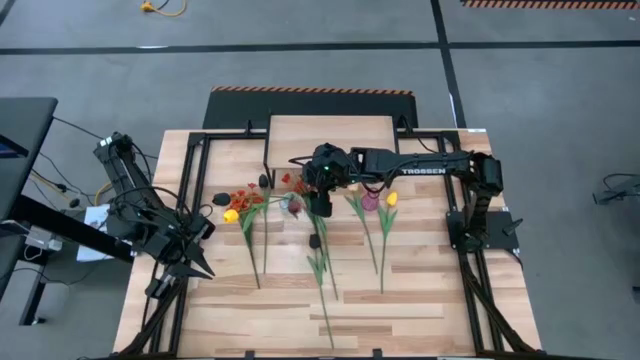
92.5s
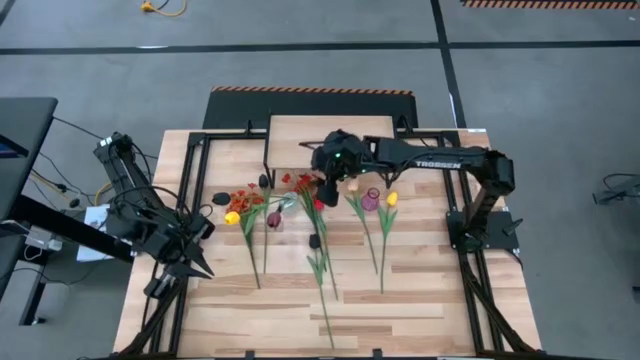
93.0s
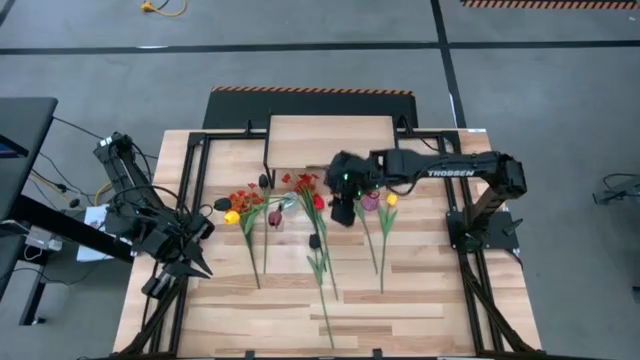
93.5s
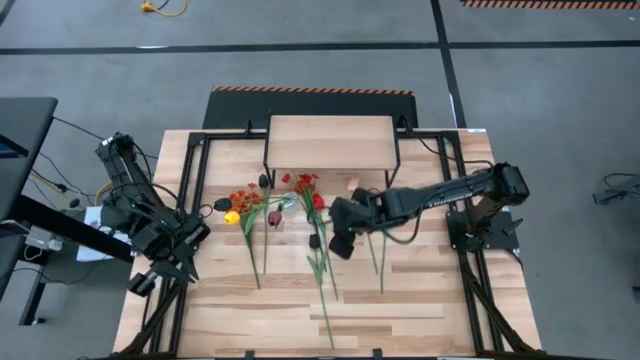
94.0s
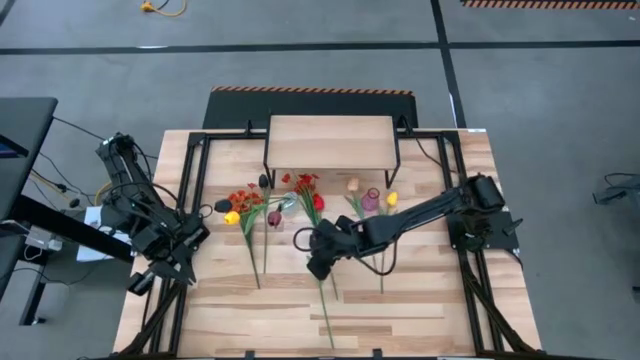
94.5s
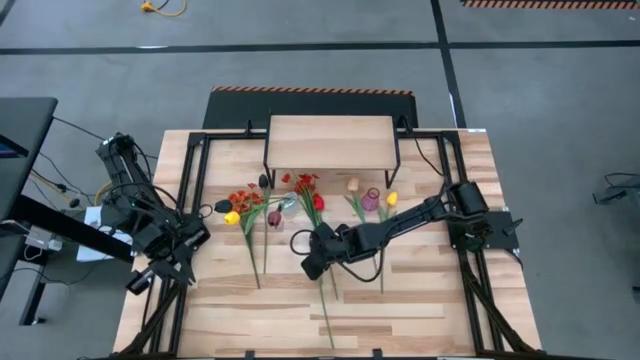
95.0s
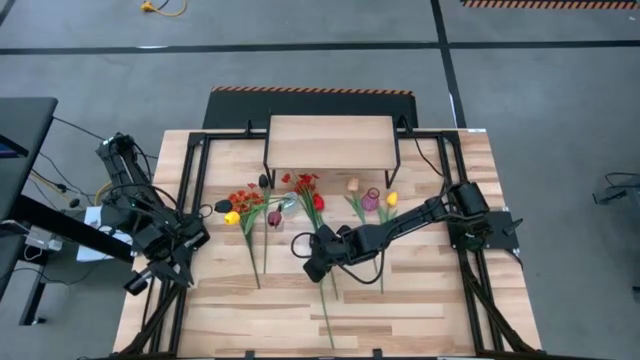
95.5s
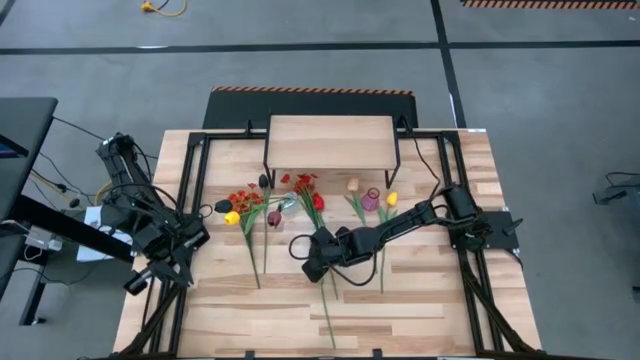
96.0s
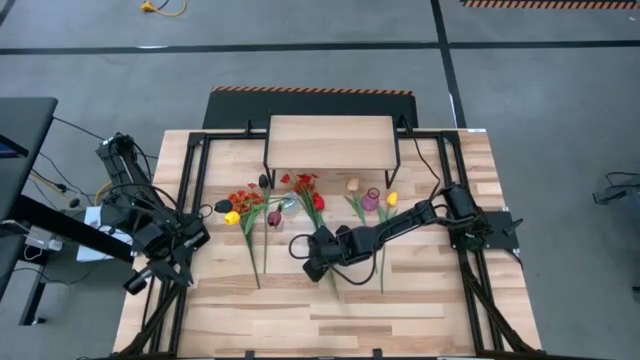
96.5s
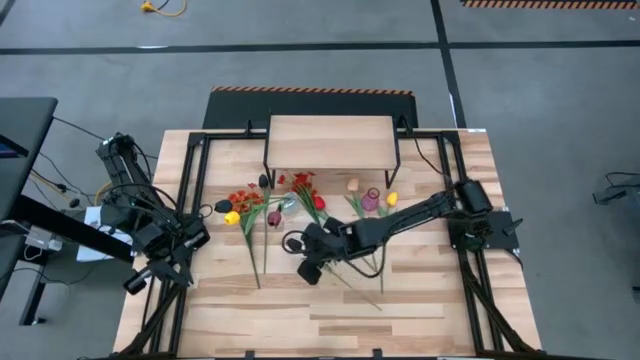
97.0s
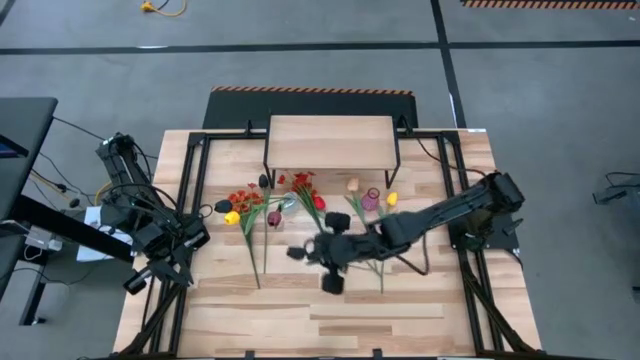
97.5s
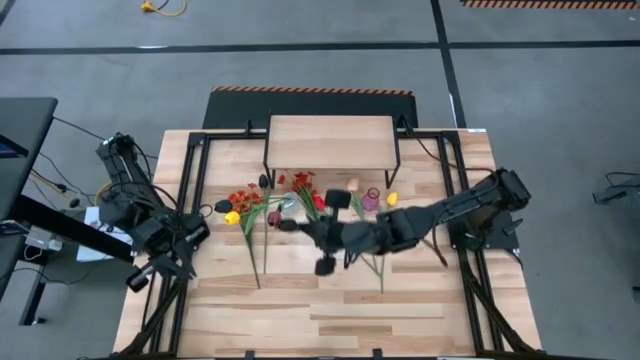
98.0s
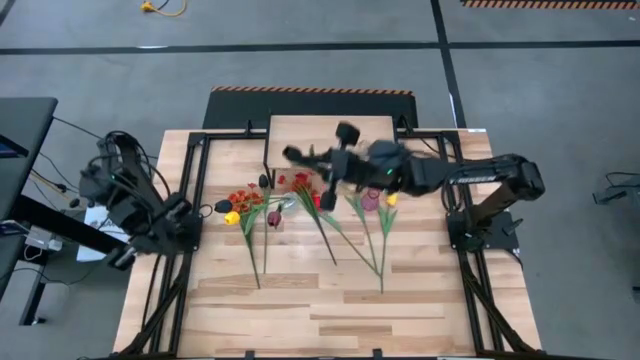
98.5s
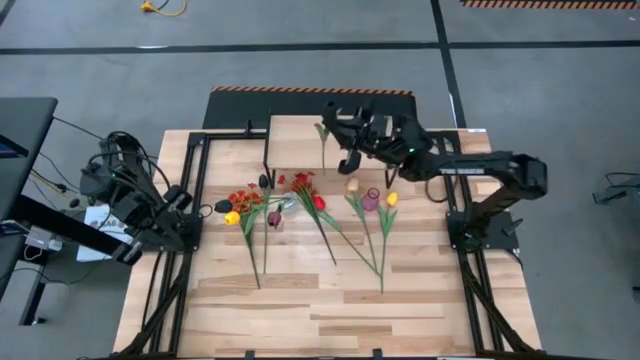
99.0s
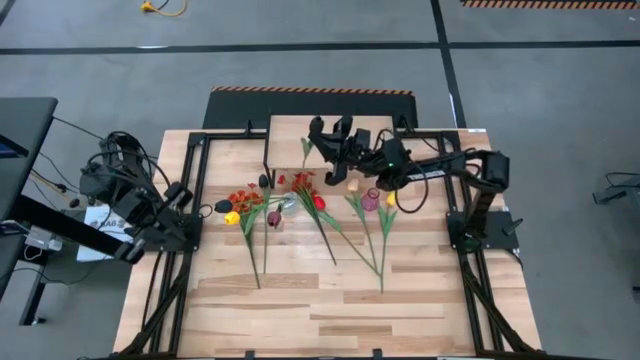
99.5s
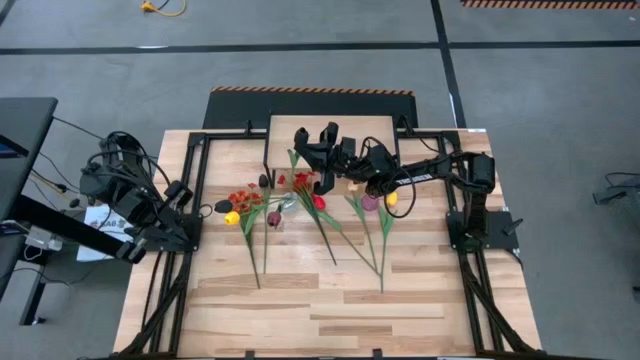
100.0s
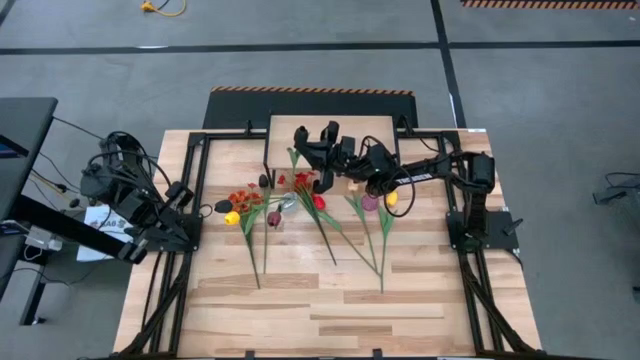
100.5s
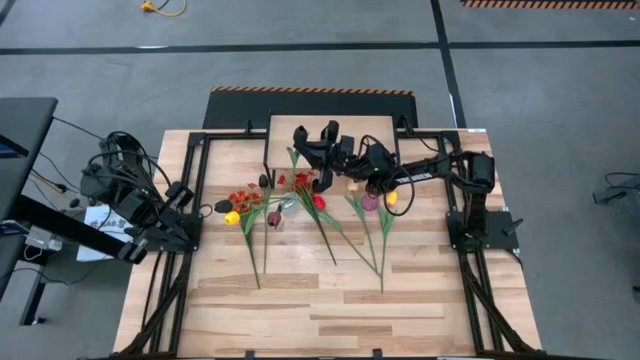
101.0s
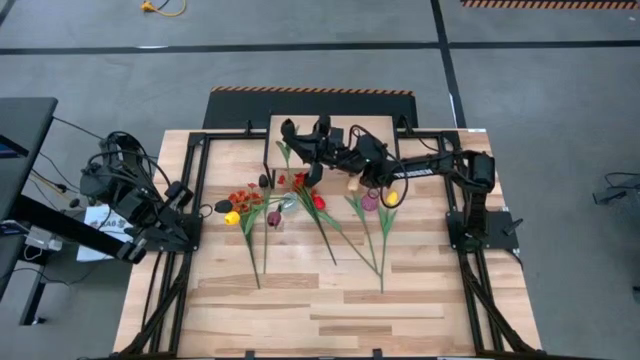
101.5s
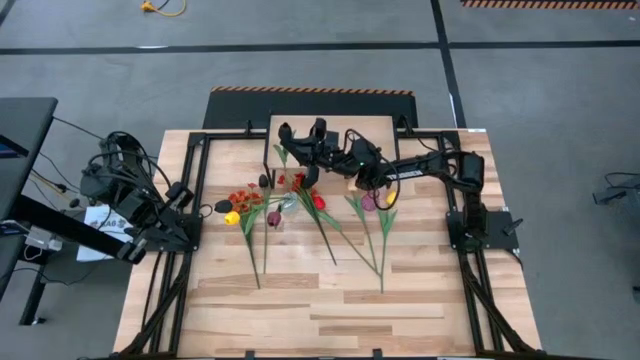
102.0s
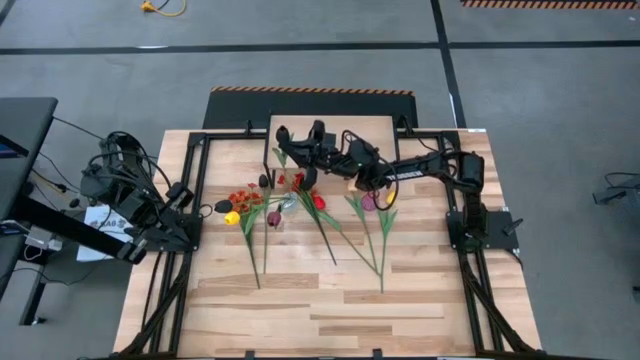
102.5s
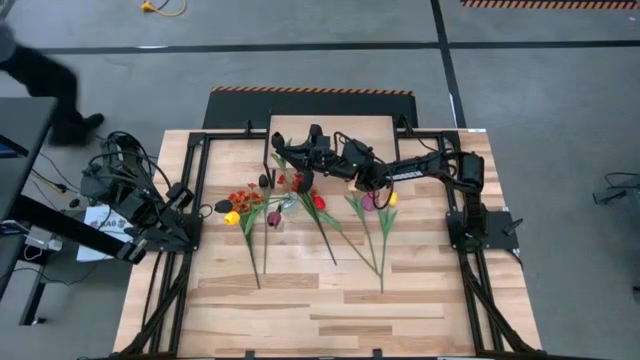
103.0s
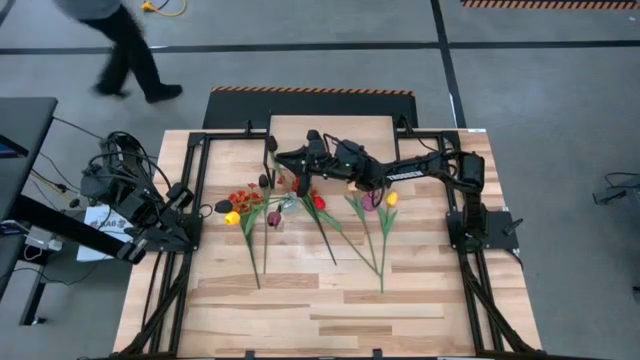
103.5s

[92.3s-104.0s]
Task: Pick and place flowers into a vace then onto a shelf
Put the right black flower into the transparent vase

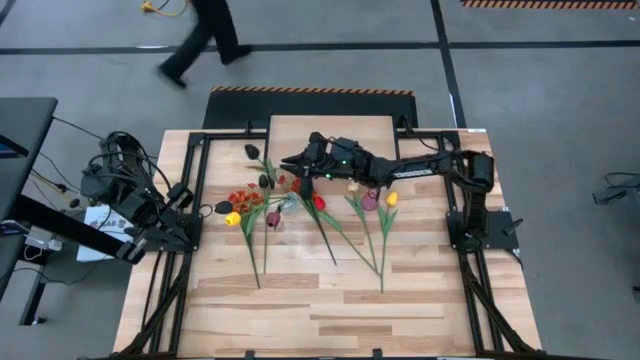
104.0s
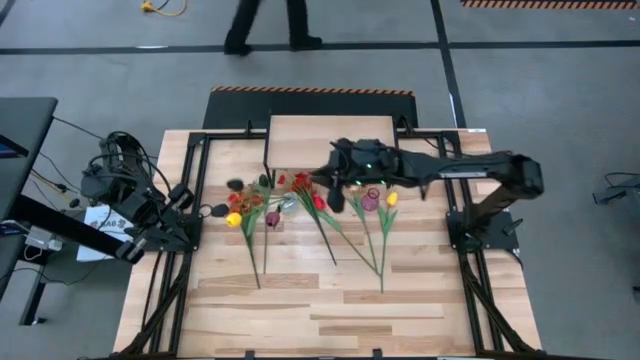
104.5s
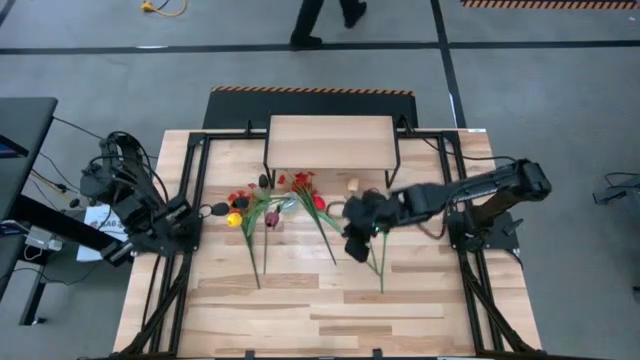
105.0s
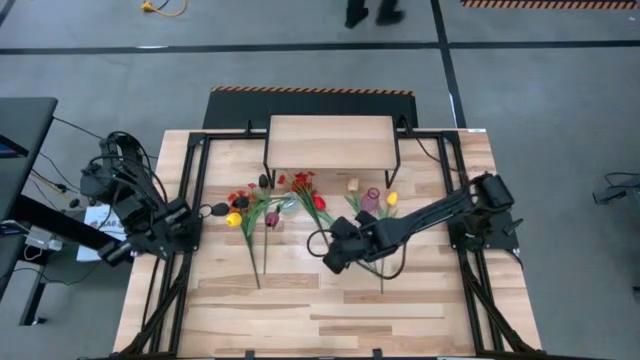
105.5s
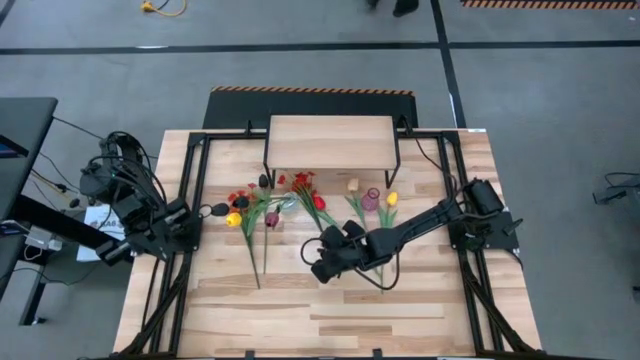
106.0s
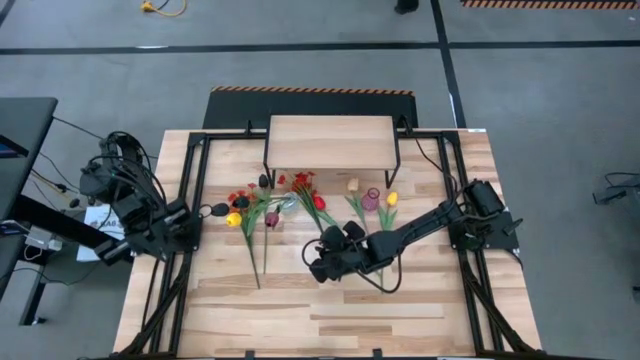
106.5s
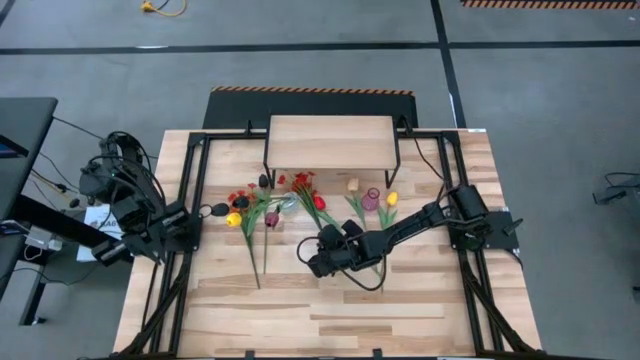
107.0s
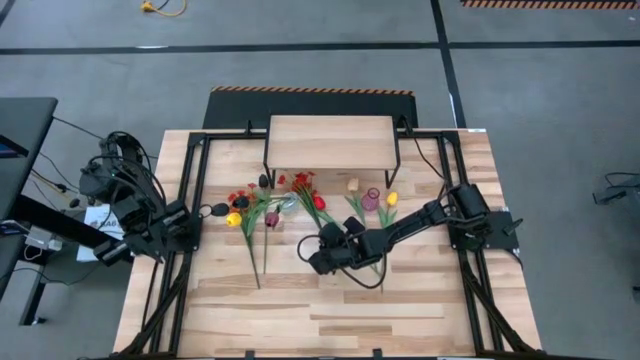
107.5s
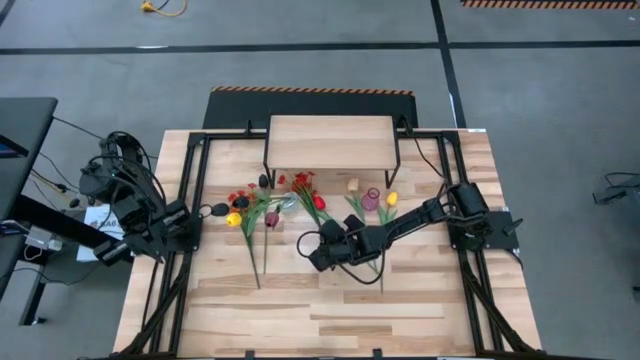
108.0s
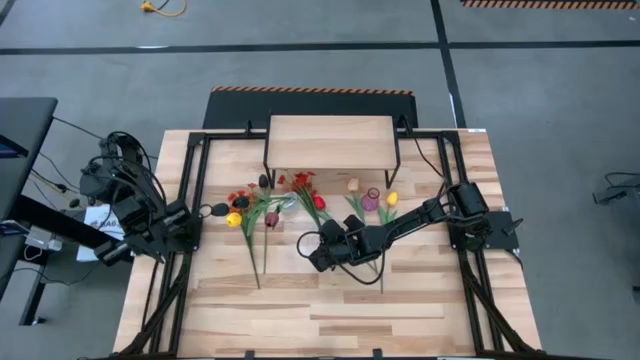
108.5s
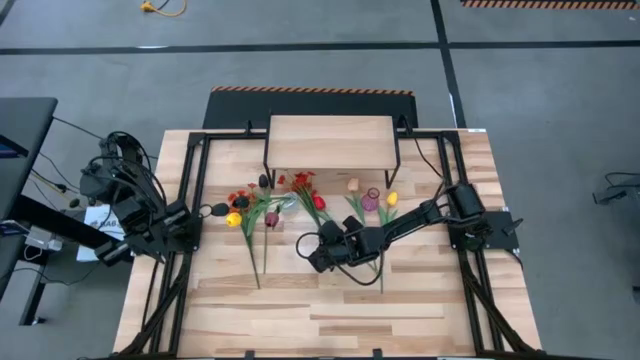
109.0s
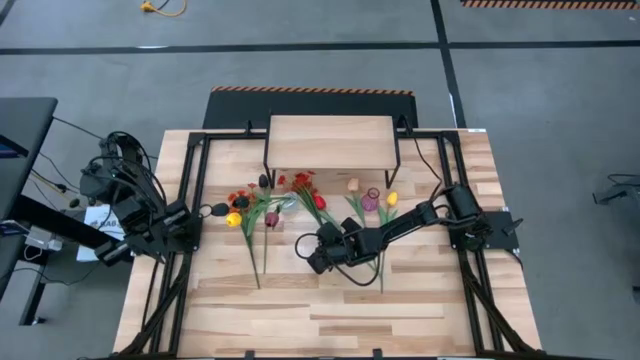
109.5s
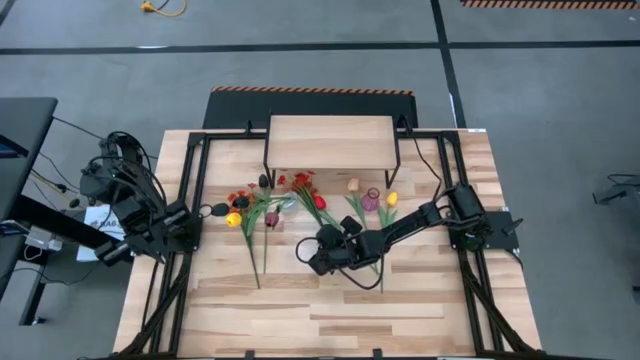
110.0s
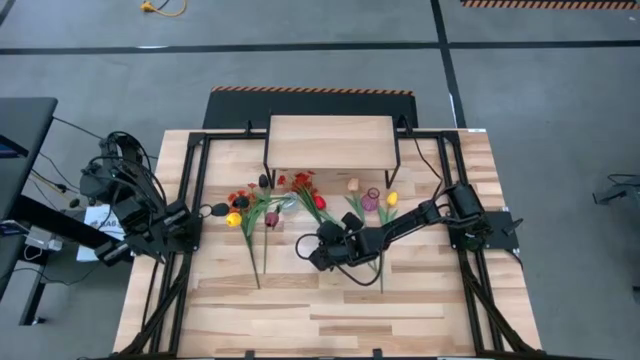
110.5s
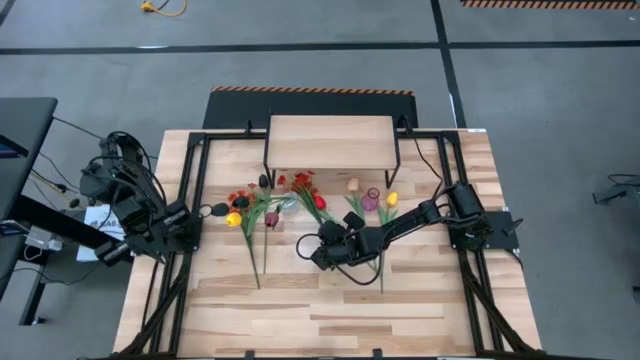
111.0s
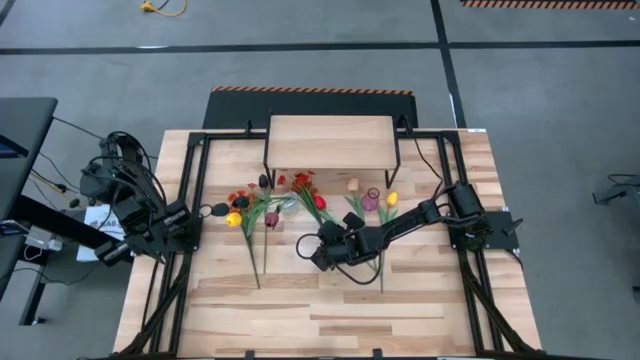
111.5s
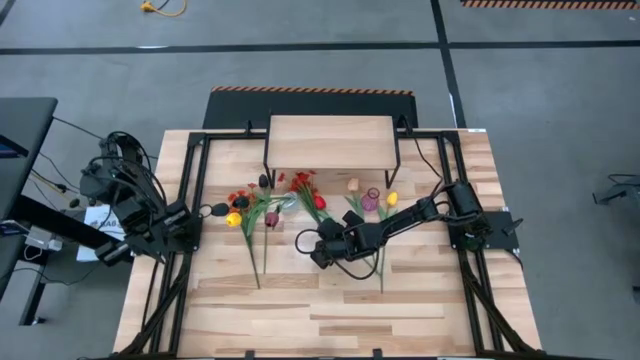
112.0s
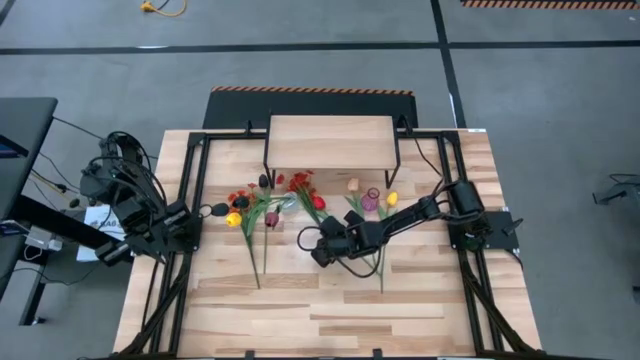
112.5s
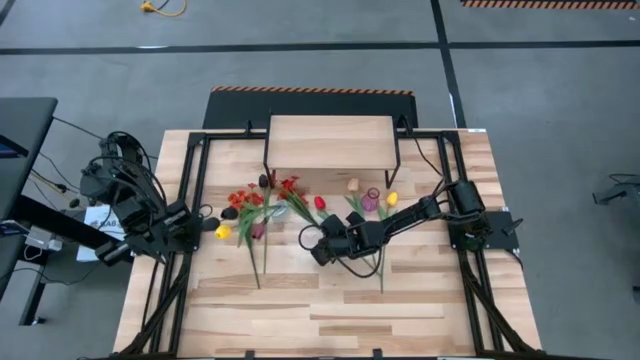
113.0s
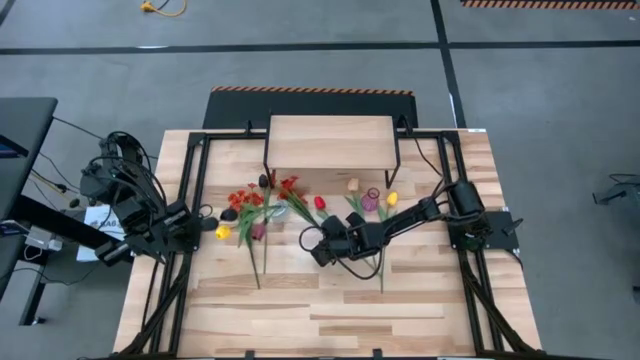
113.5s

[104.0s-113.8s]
Put the right red flower into the purple vase
